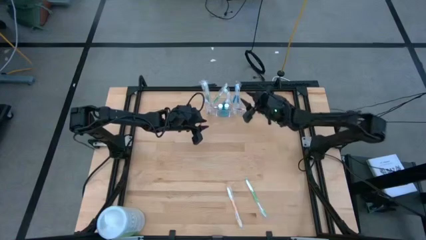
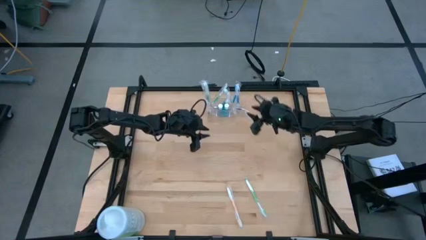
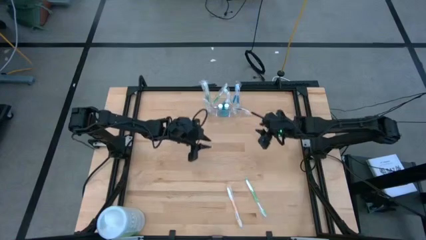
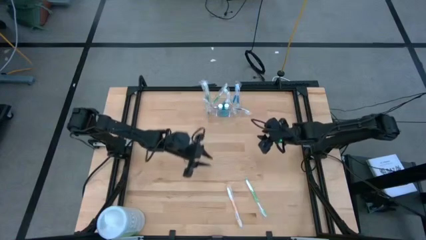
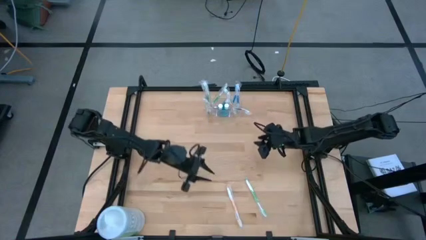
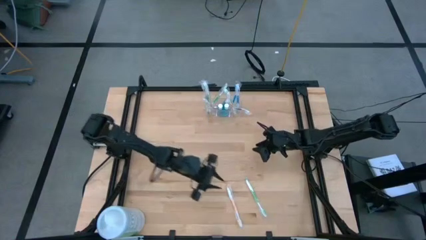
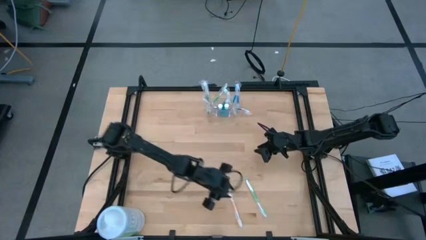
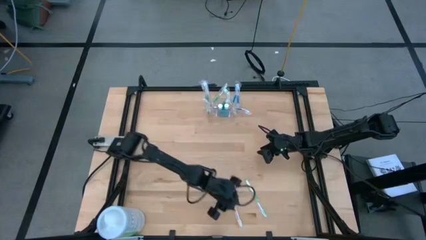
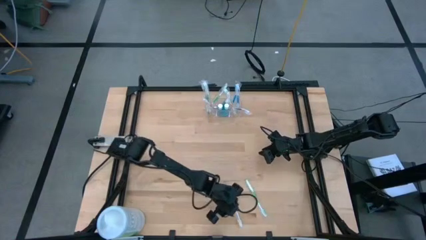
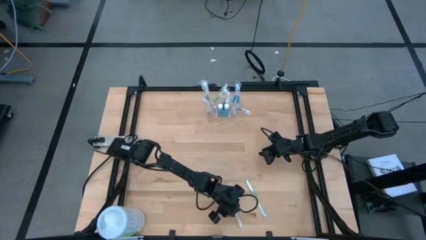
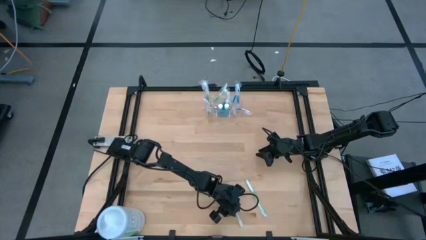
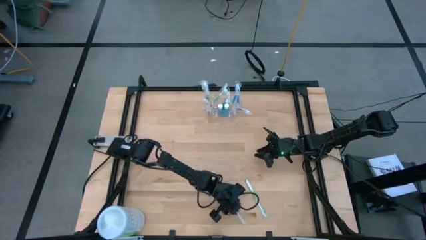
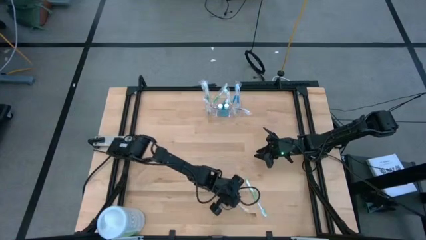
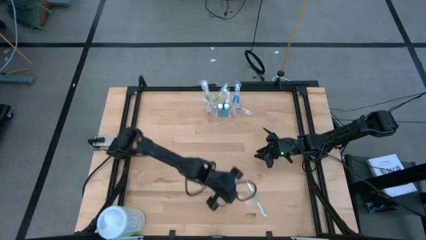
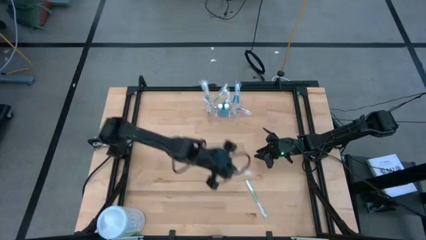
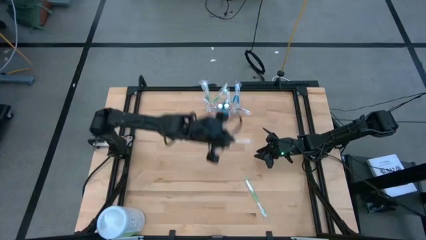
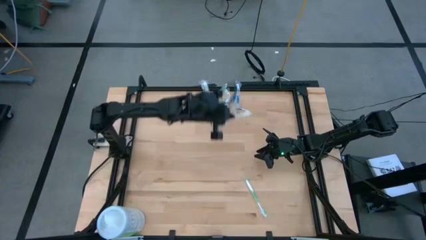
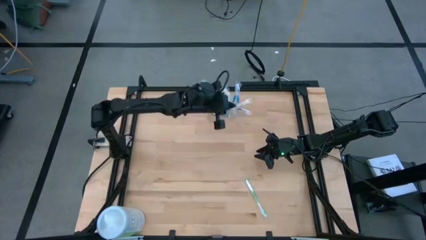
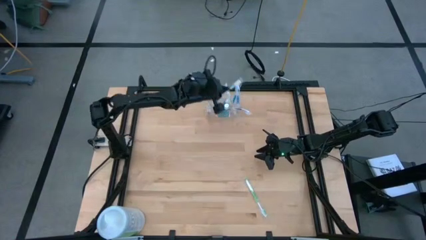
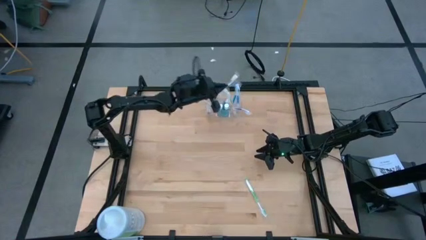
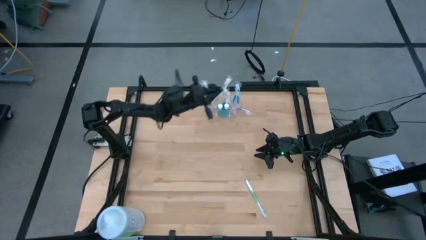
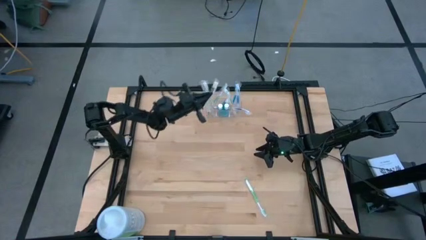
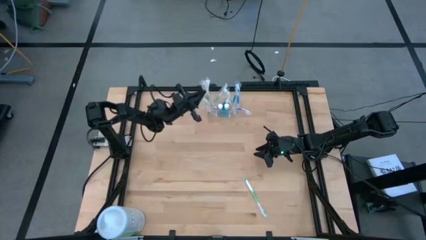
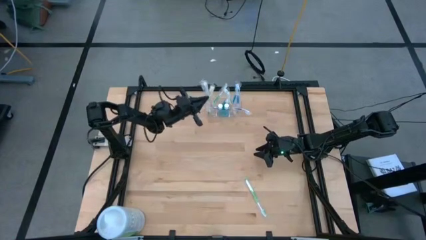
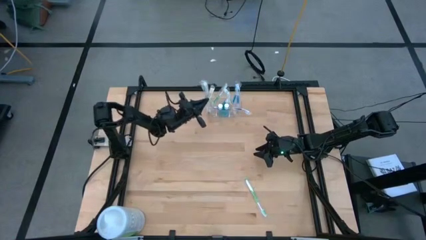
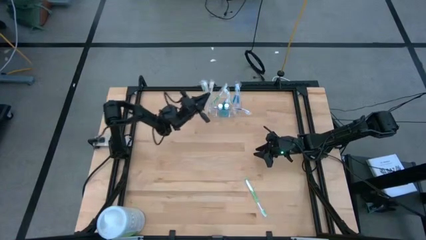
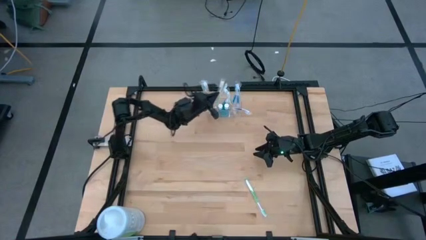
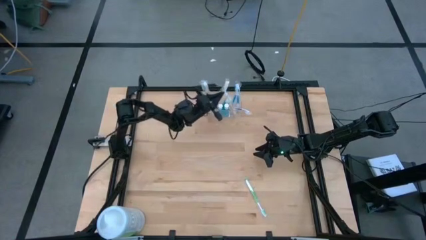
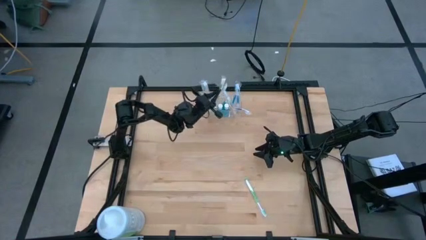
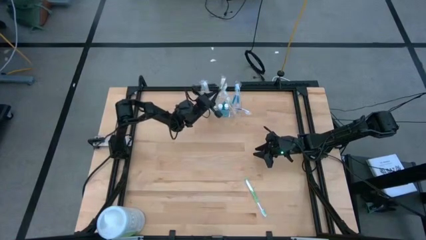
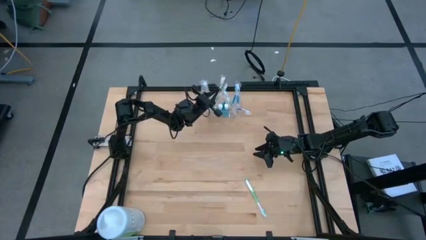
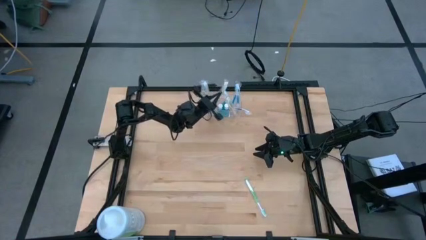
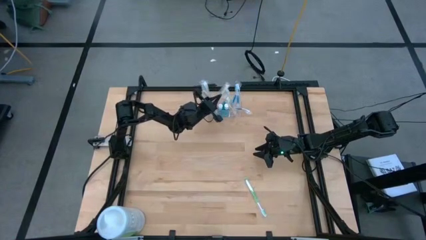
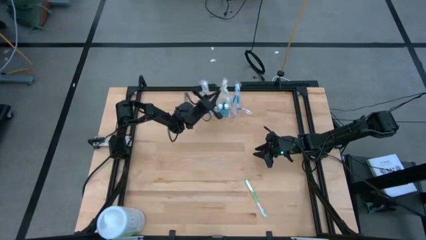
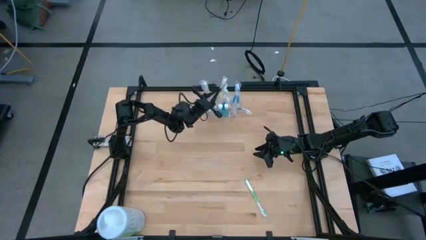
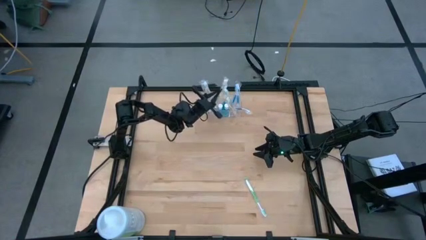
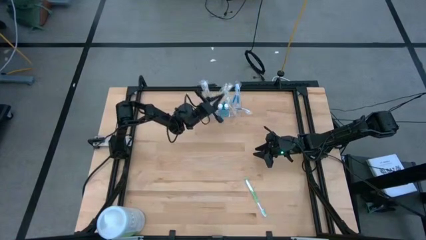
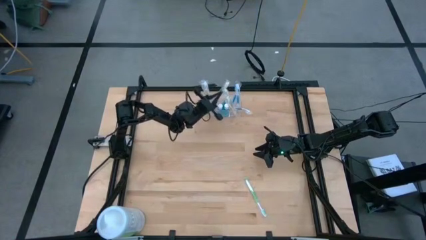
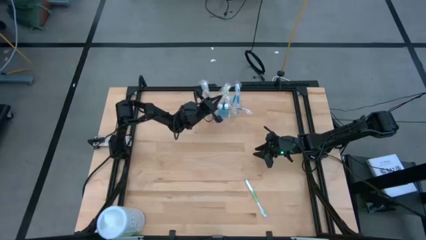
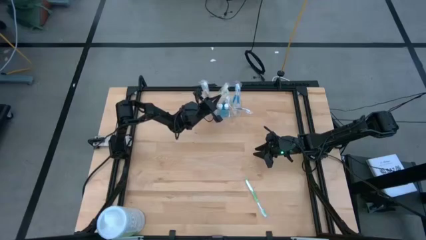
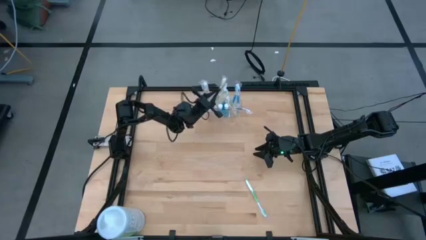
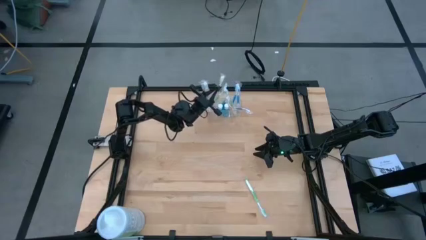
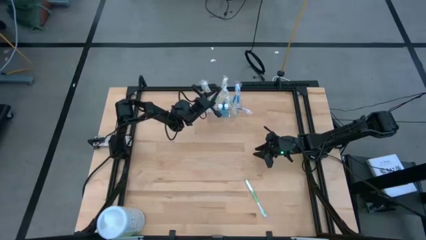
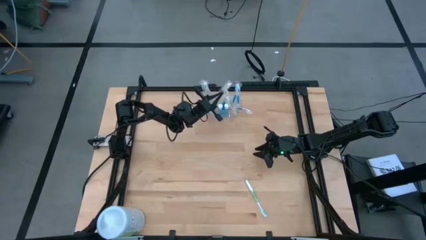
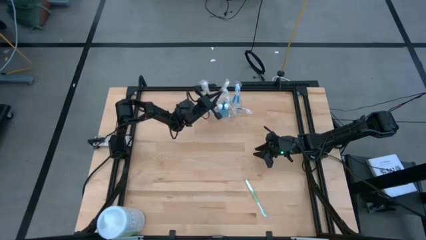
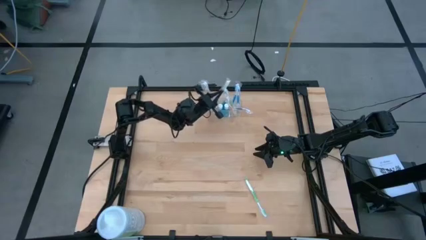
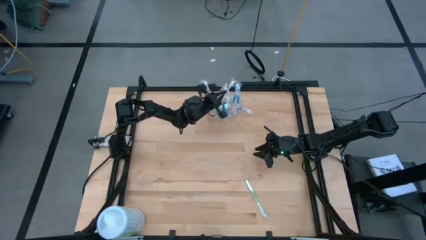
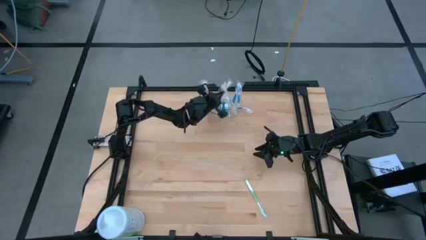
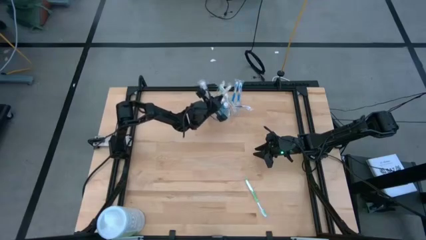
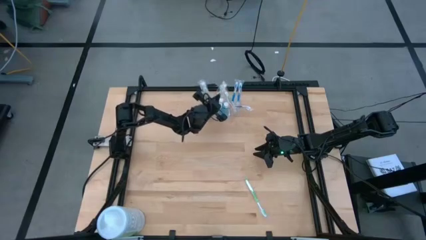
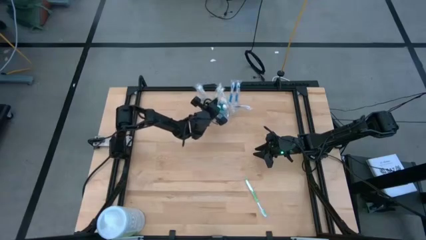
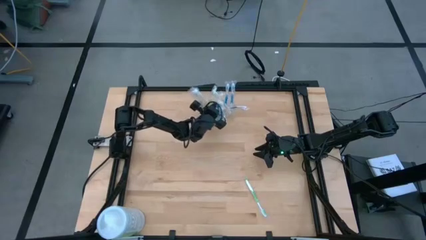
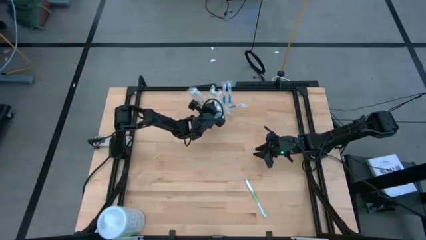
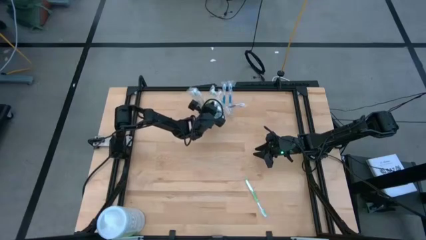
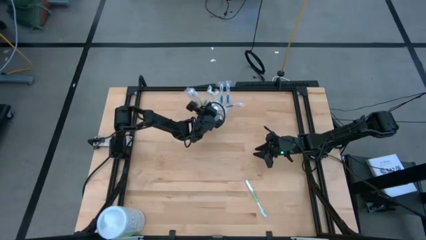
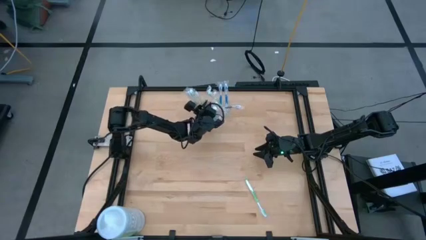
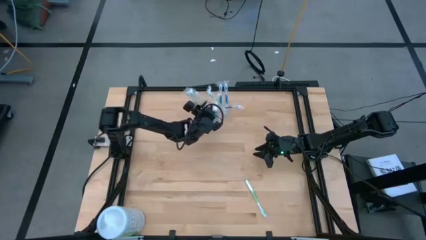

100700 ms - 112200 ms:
Task: Pick & Place toothbrushing station
Put the orange toothbrush into the transparent organizer

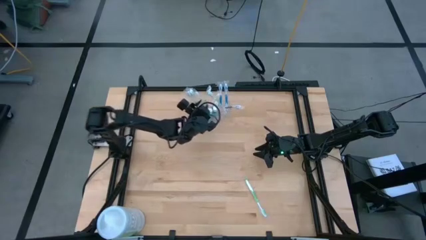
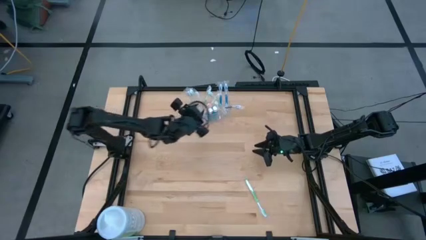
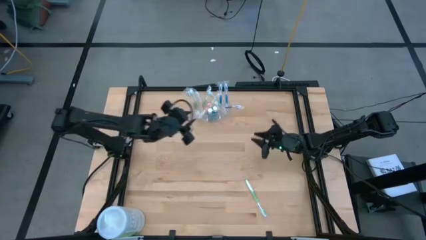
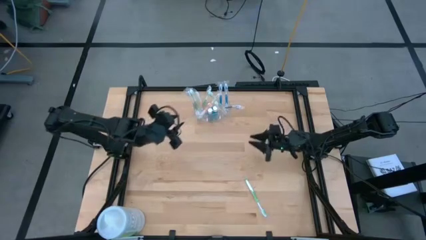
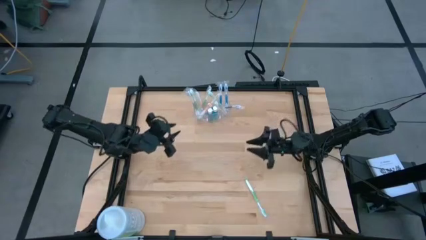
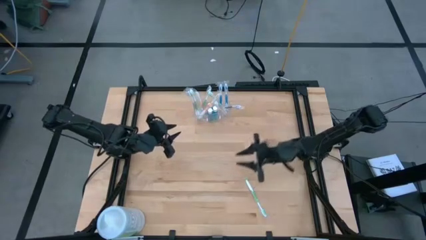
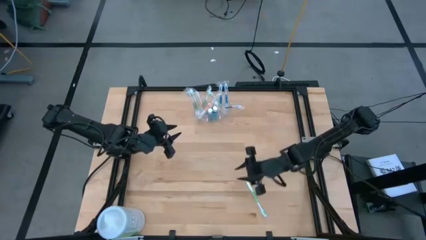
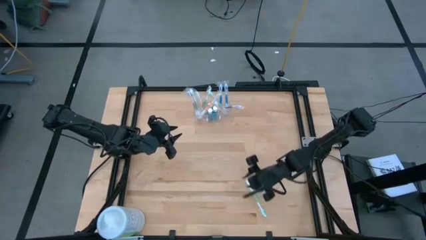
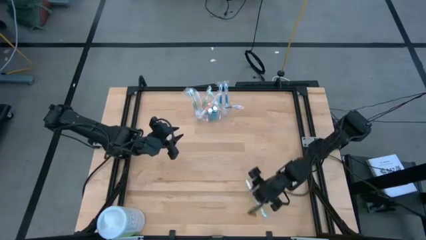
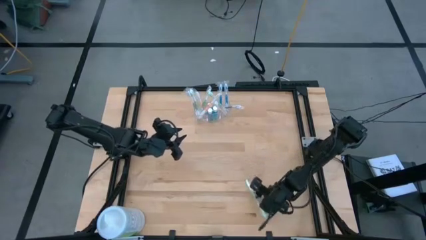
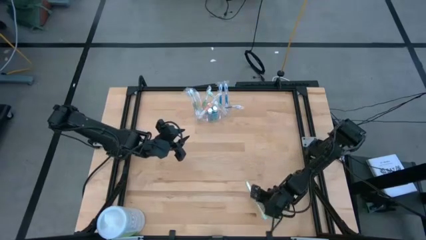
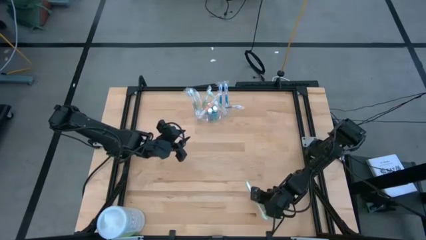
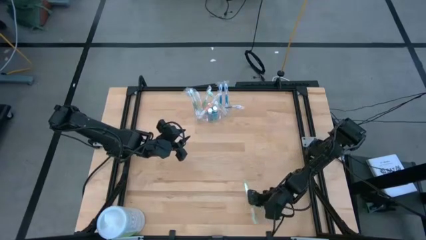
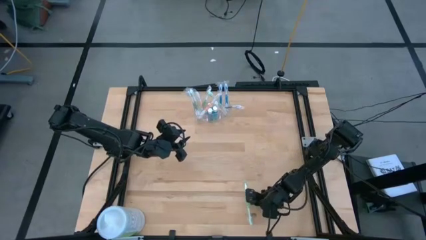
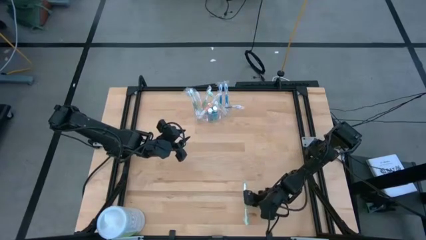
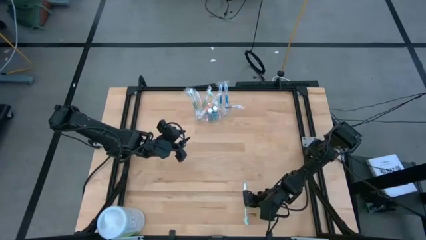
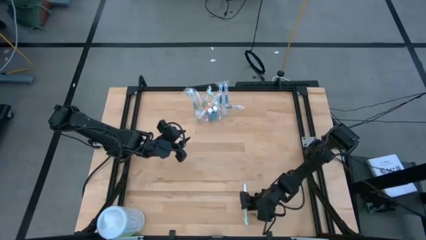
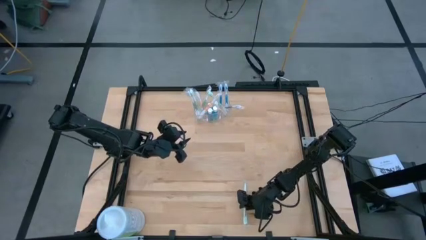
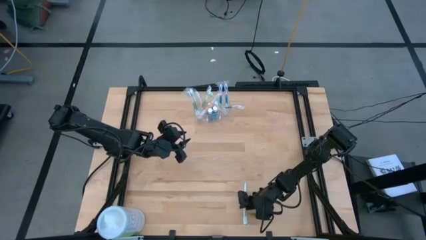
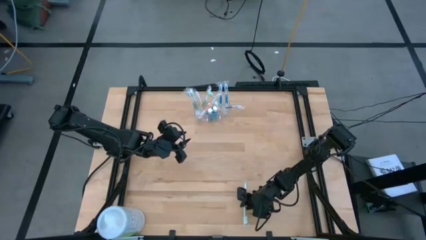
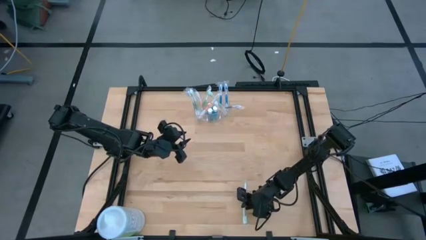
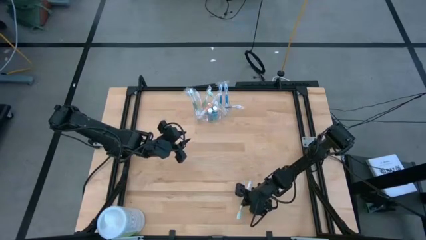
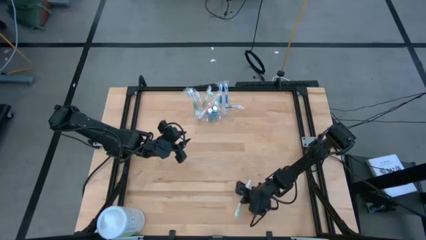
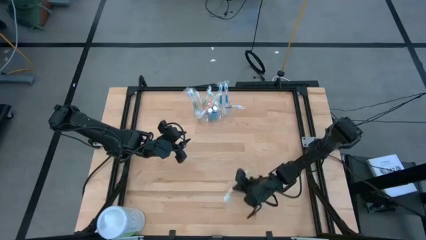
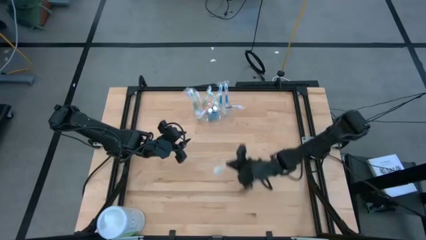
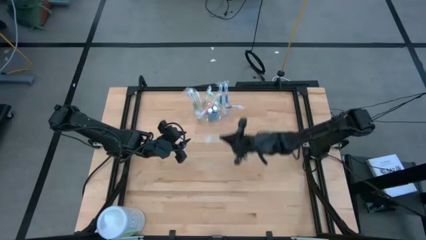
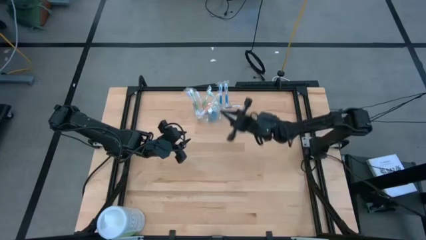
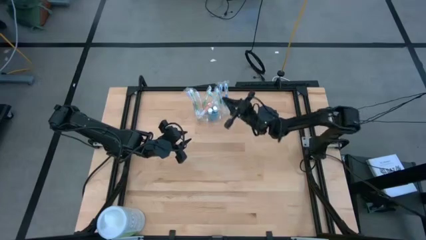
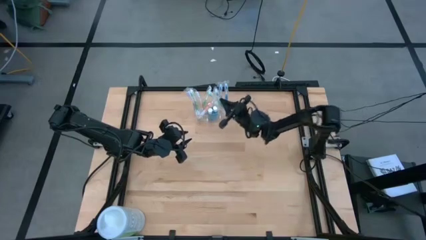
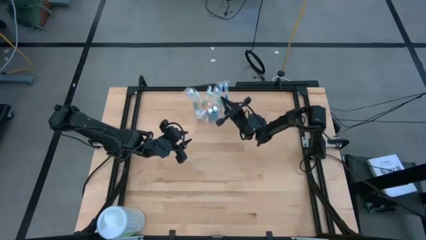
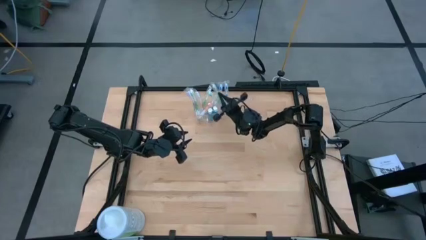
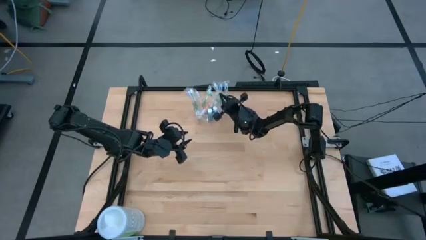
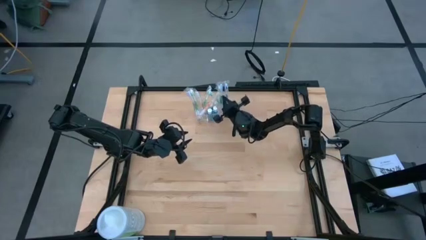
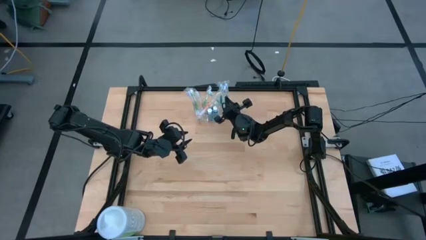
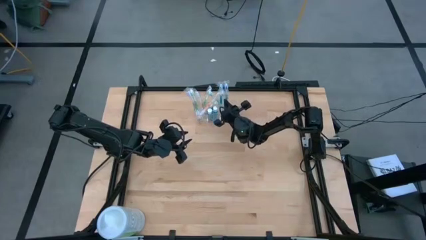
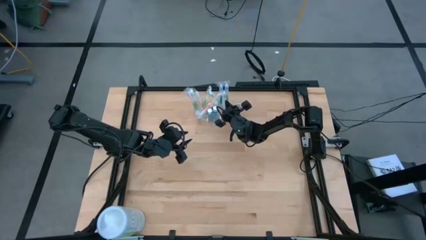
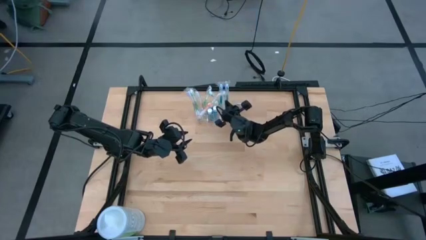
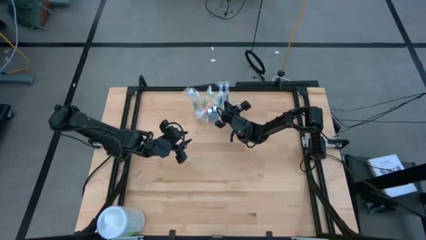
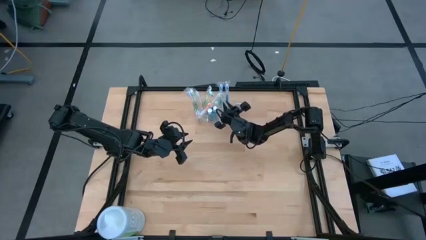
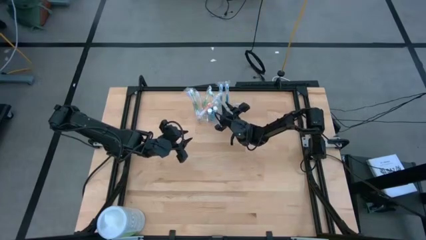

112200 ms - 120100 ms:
Put the green toothbrush into the transparent organizer
